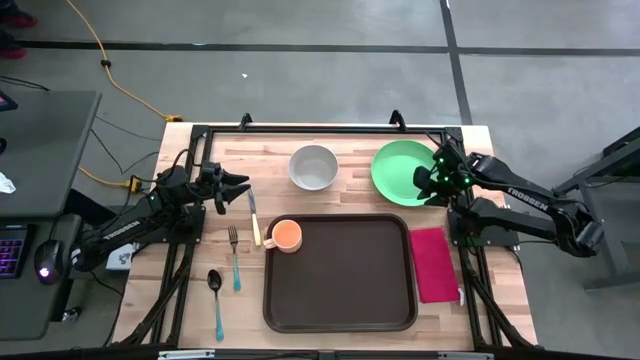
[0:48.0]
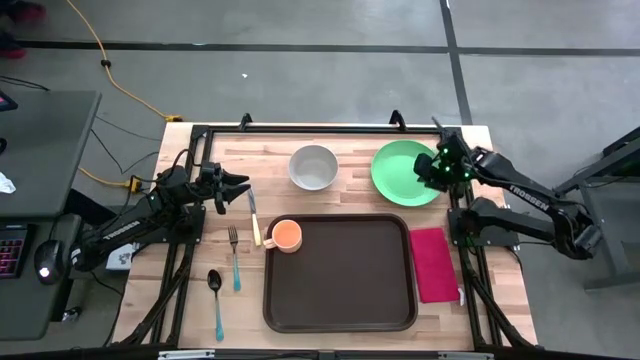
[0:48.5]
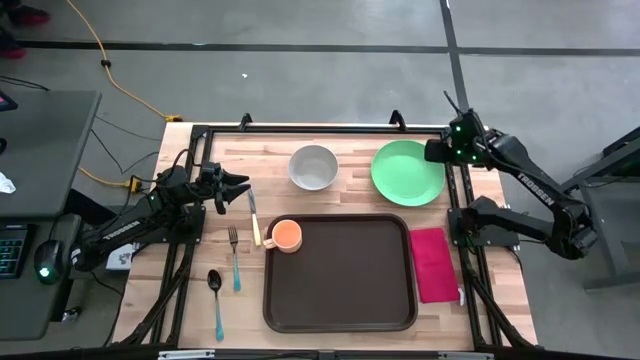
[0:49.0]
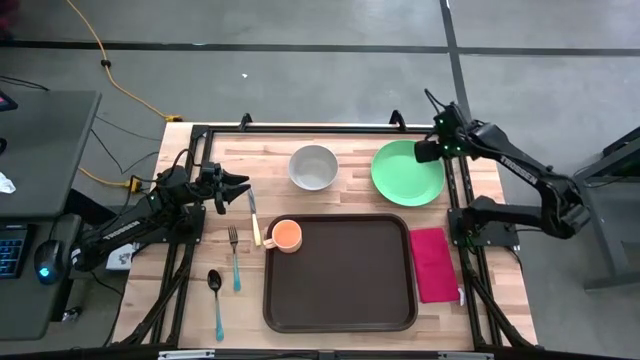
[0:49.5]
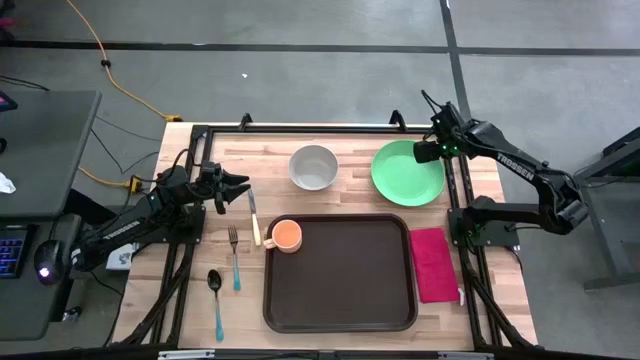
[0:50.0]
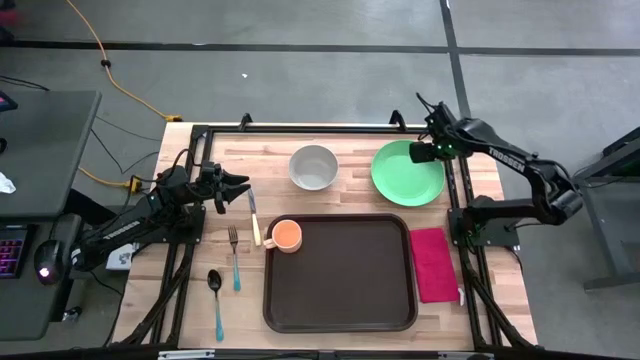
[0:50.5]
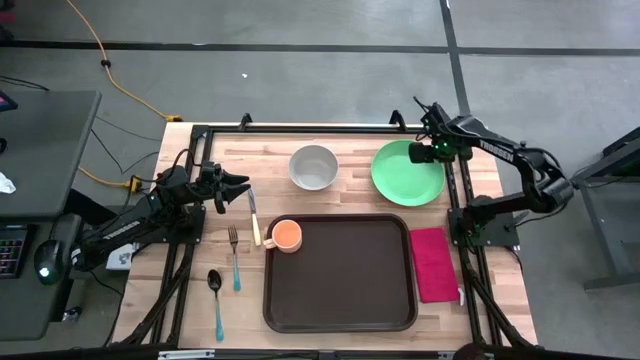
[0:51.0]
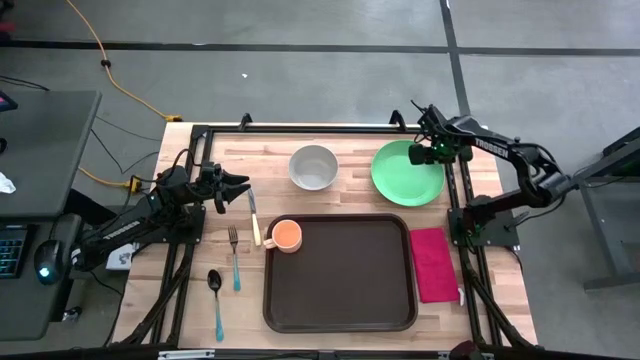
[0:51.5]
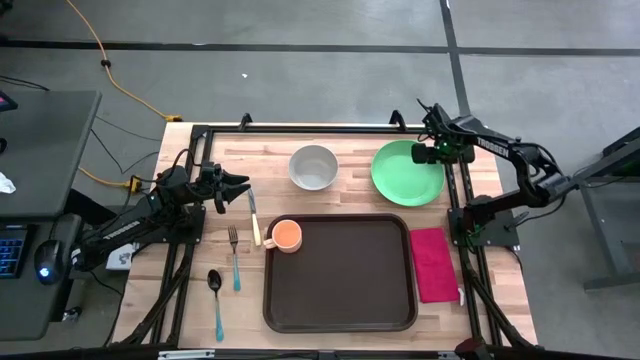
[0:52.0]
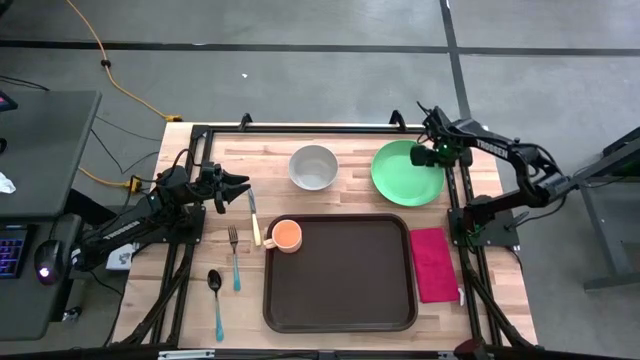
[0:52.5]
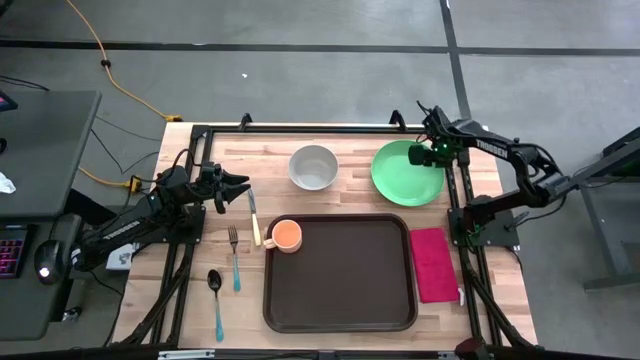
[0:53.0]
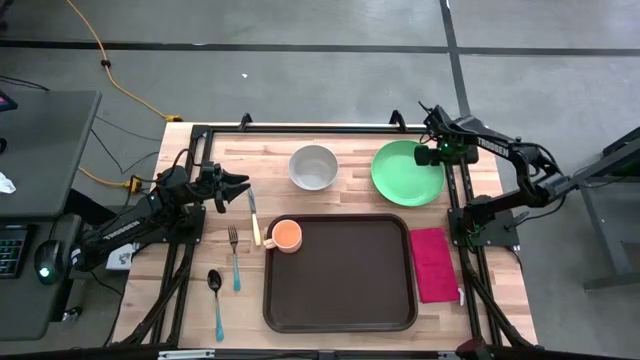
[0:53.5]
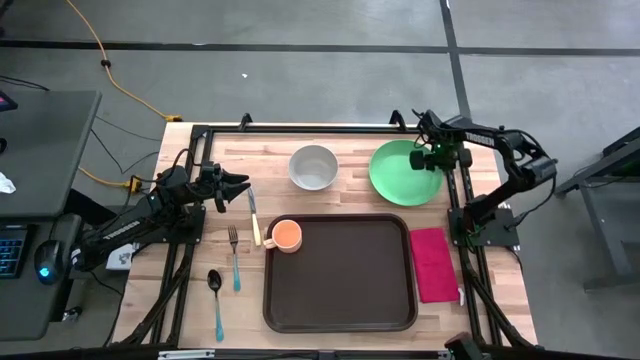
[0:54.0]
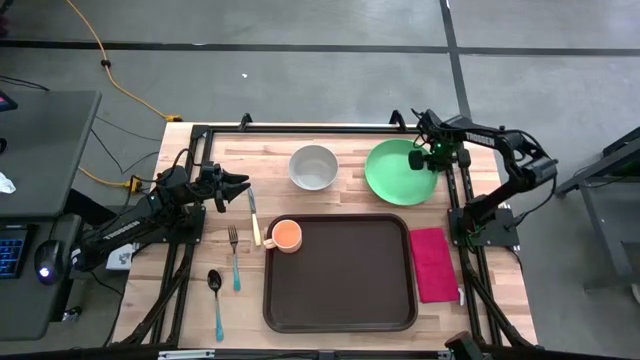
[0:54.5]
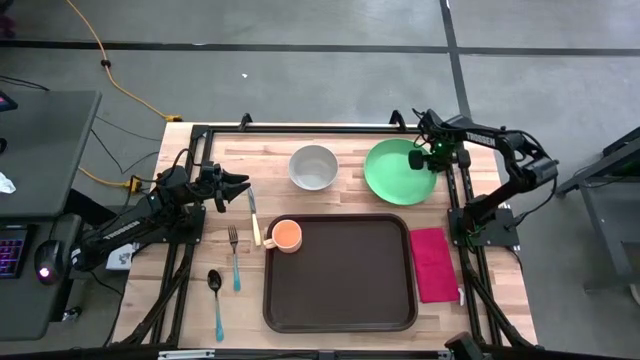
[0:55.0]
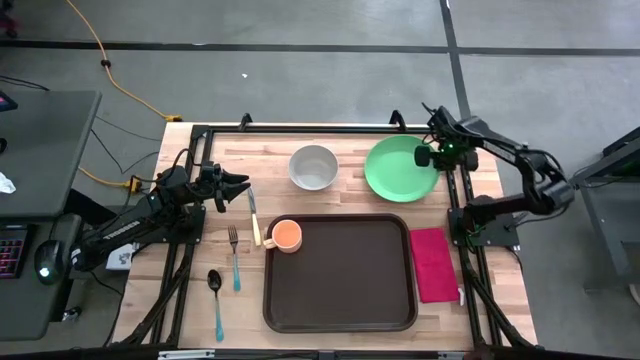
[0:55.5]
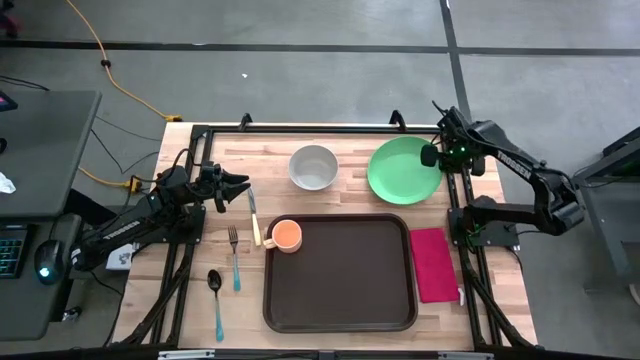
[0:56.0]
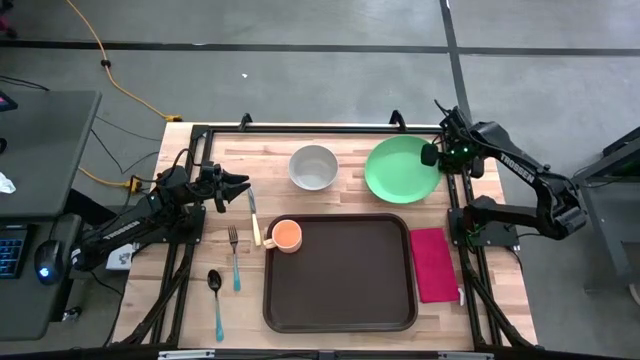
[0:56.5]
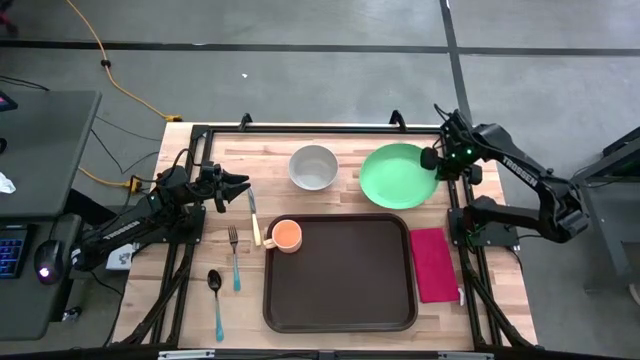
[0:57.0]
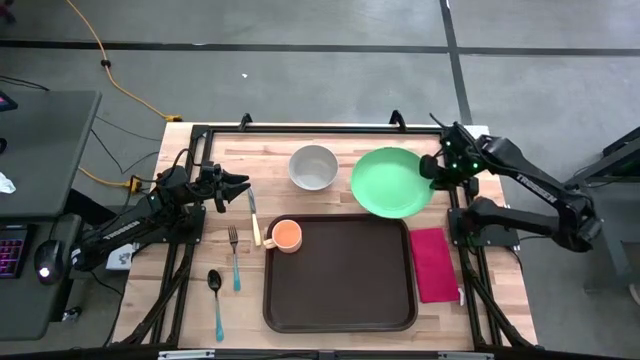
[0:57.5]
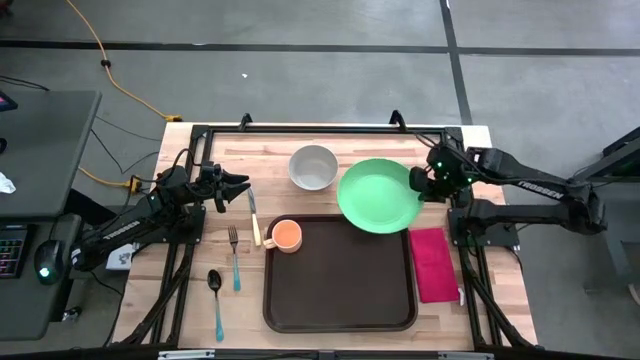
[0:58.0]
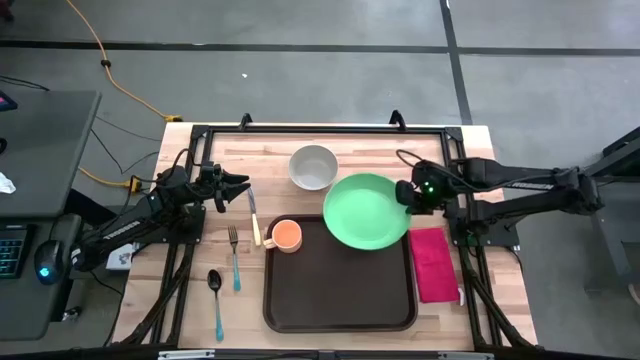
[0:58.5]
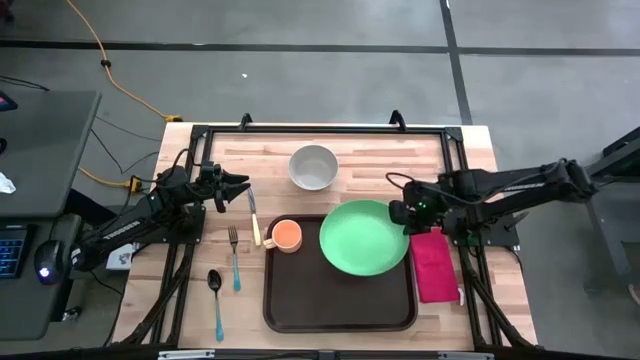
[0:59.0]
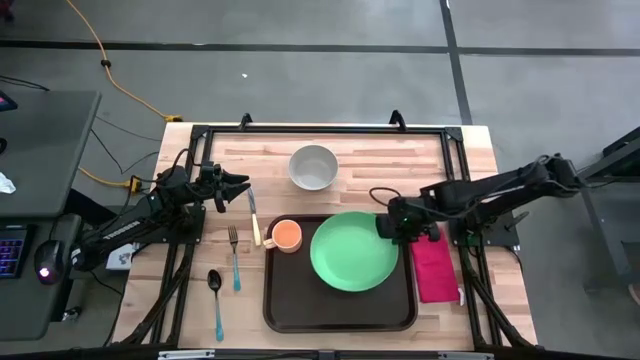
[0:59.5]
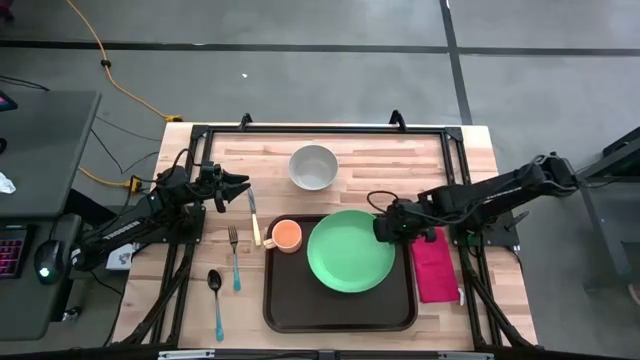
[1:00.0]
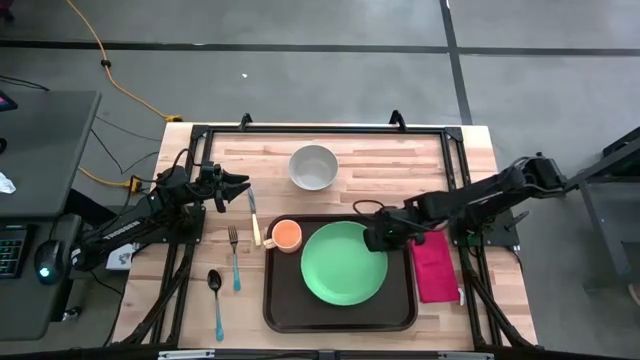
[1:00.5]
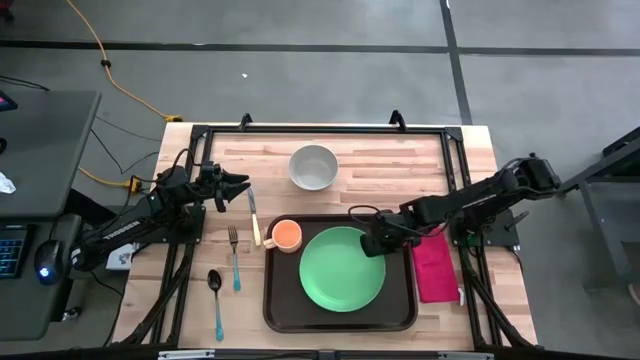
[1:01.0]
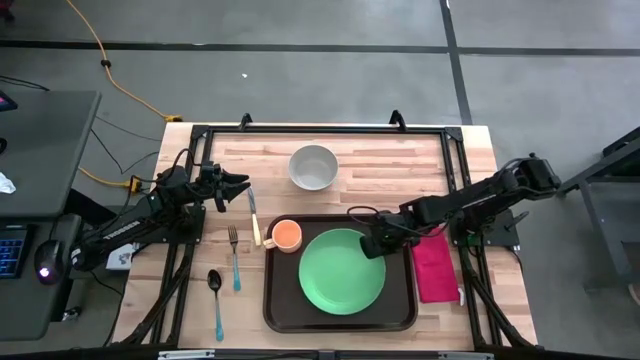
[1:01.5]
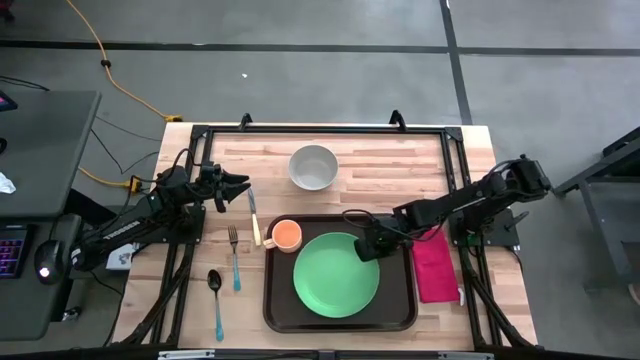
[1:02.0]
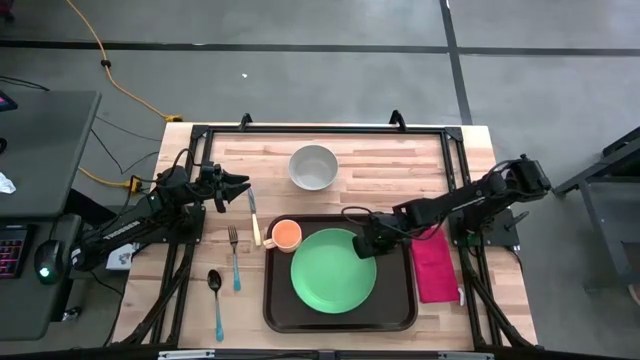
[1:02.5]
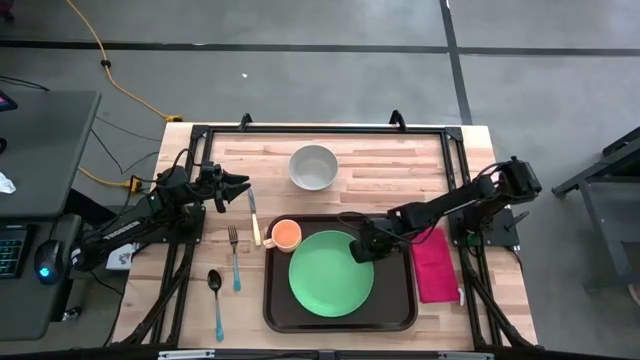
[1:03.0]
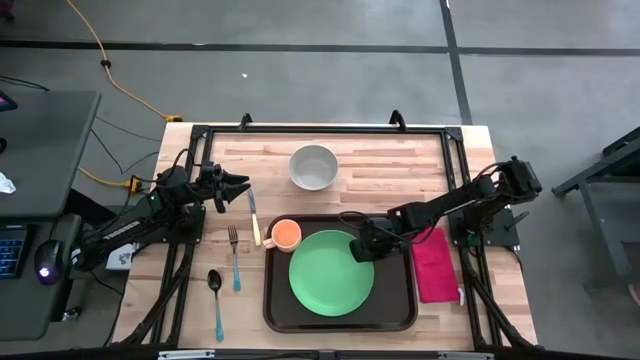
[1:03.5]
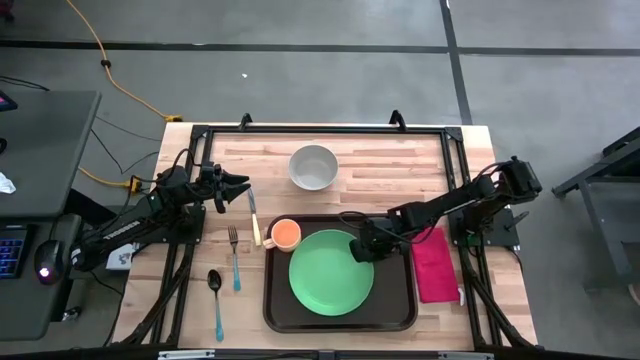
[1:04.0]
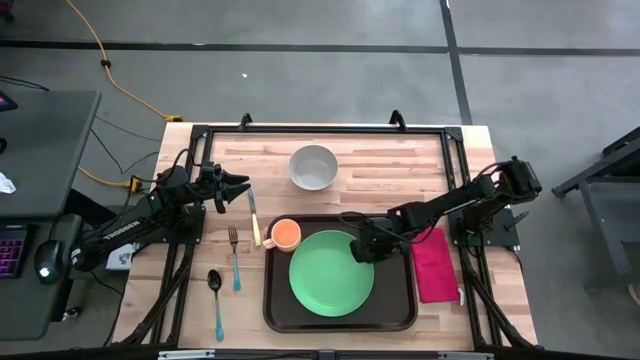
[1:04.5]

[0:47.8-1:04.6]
Task: Set up tray
Put the green plate on the black tray
